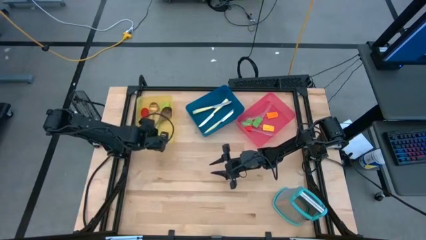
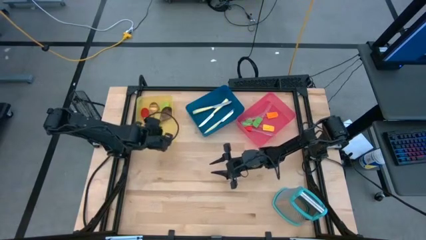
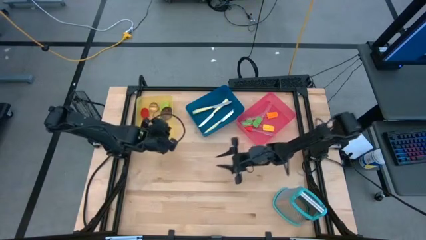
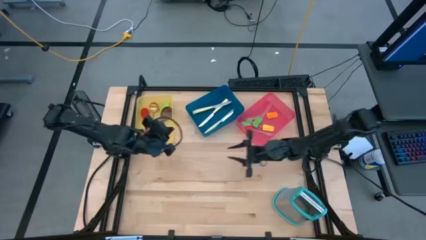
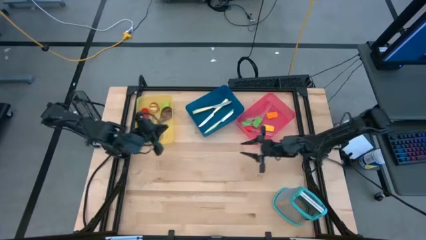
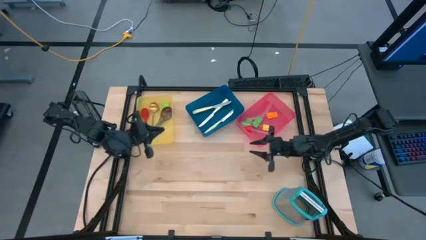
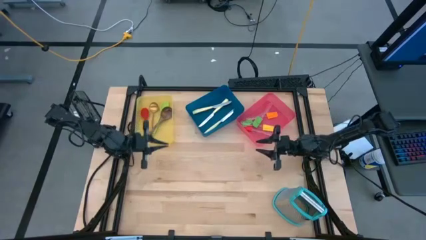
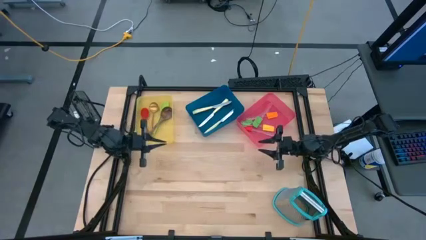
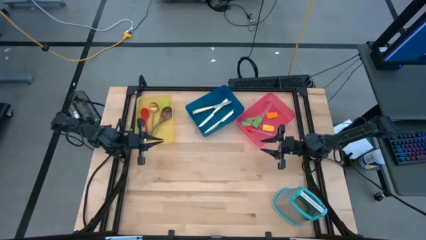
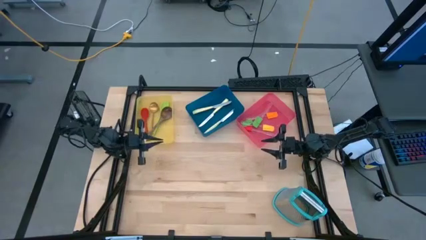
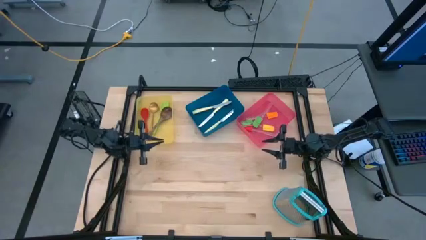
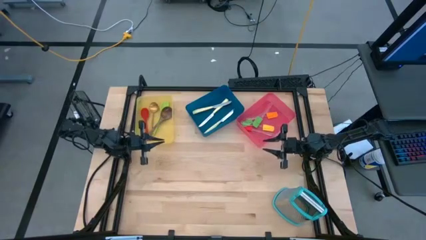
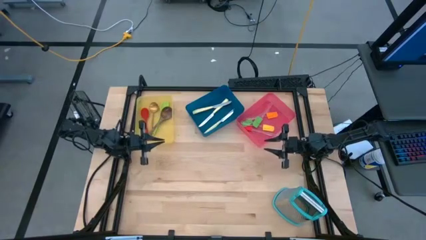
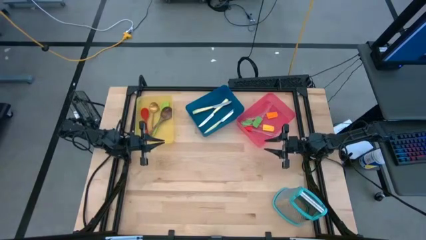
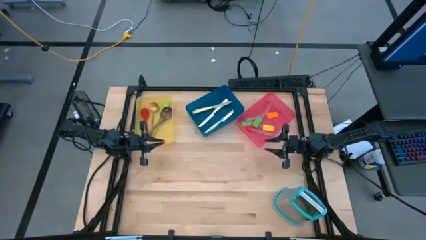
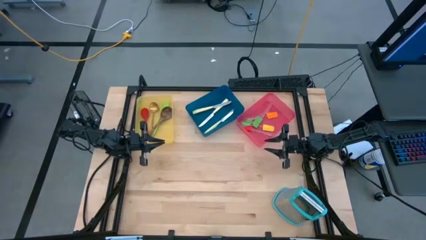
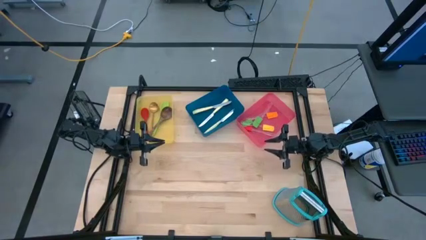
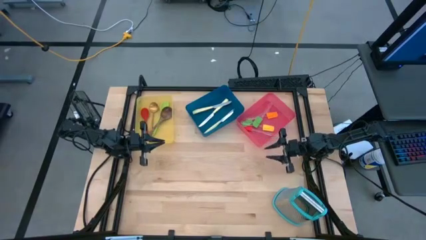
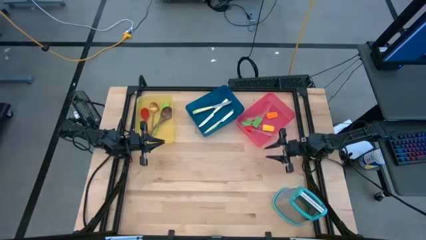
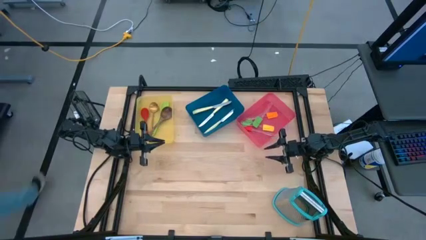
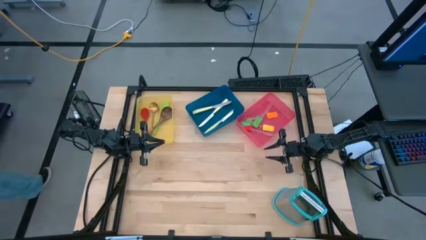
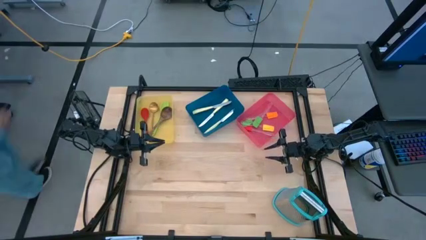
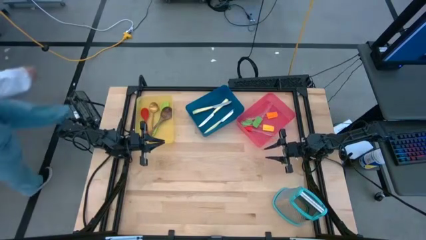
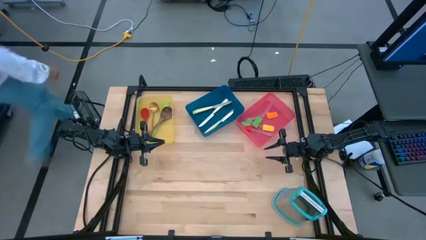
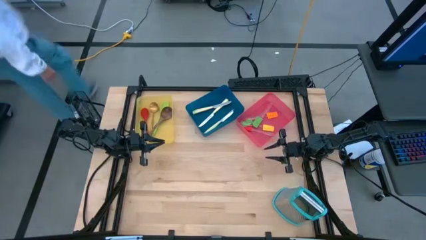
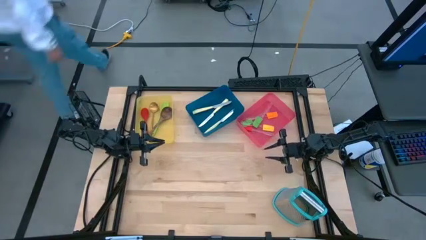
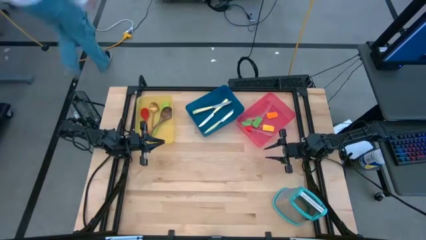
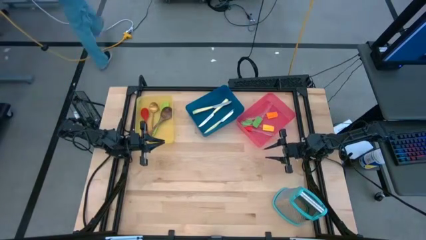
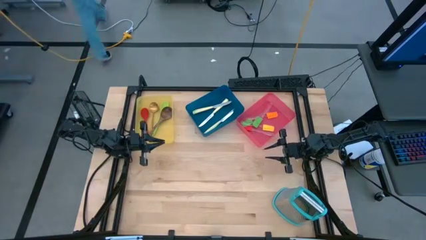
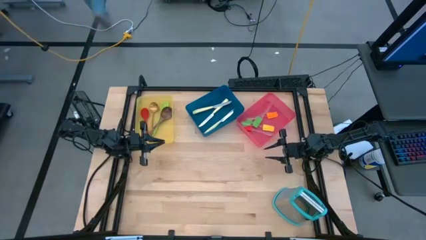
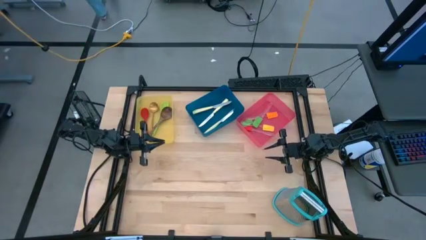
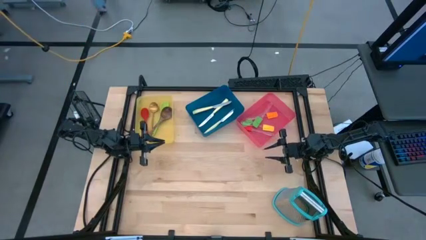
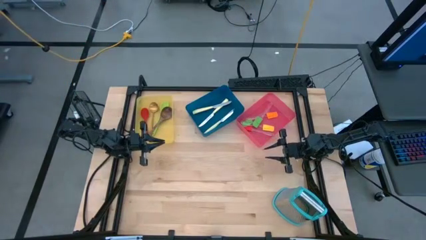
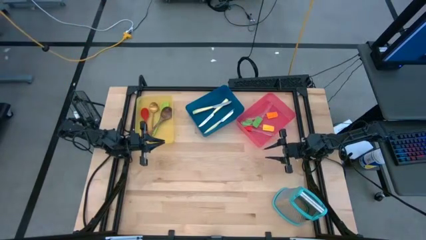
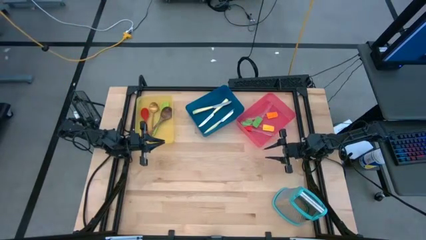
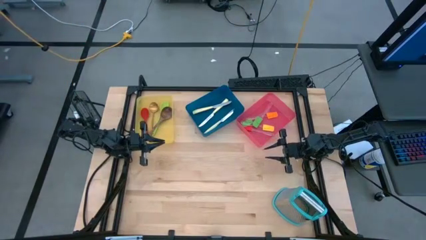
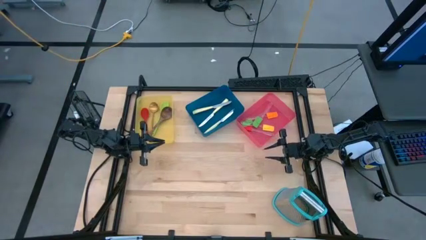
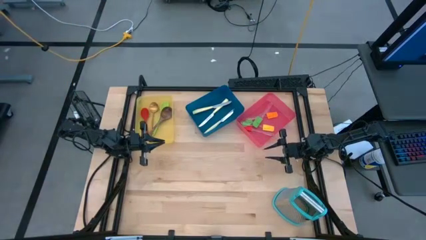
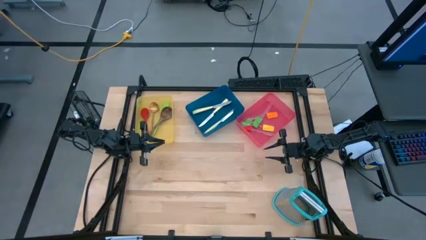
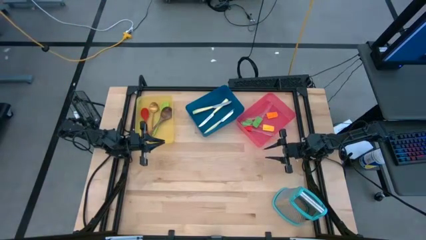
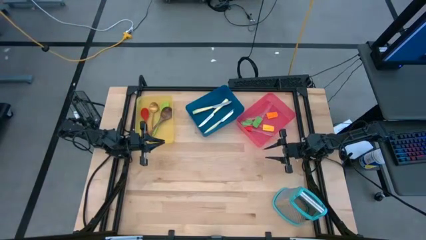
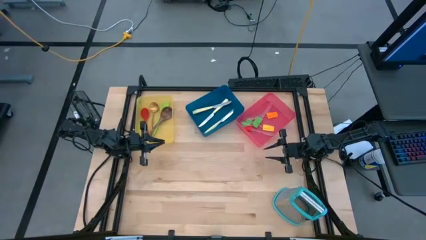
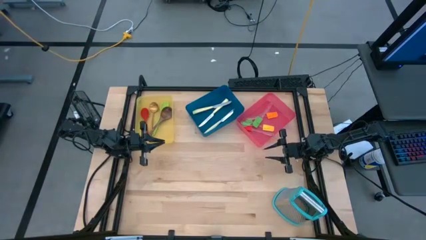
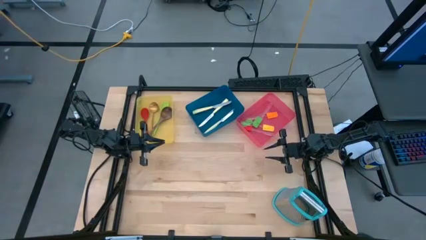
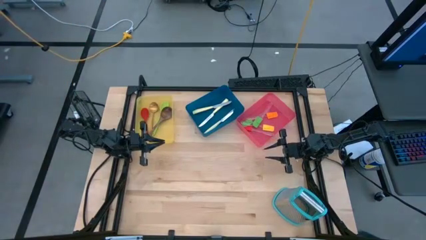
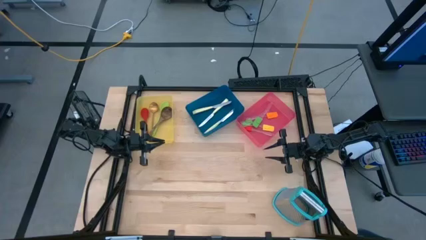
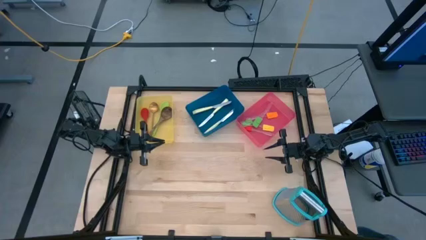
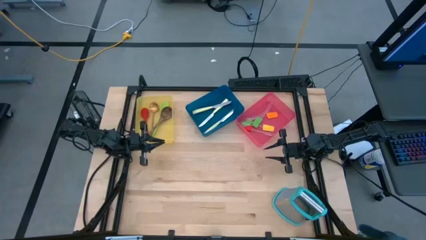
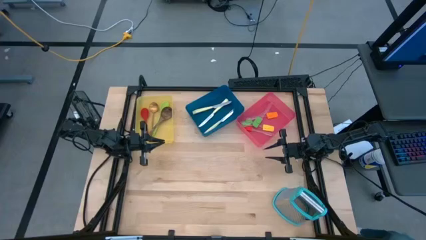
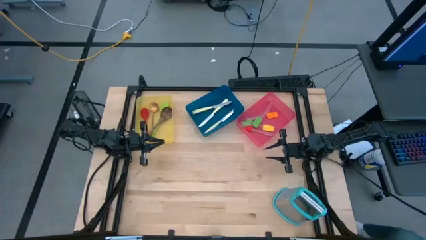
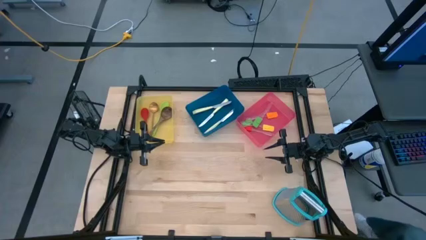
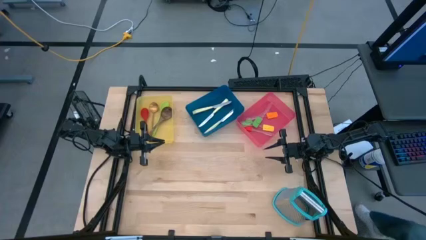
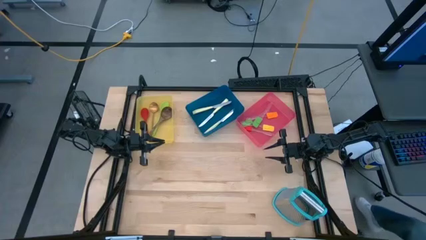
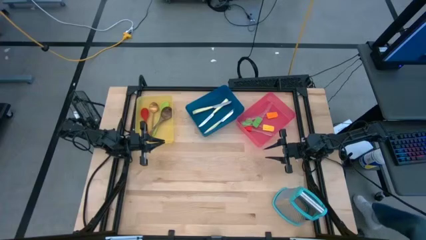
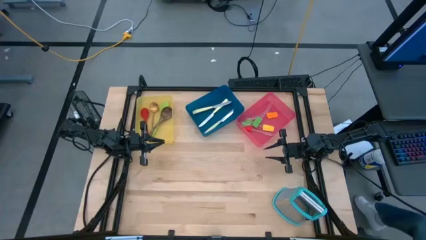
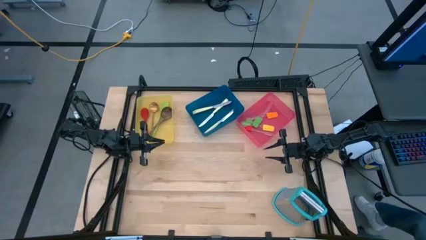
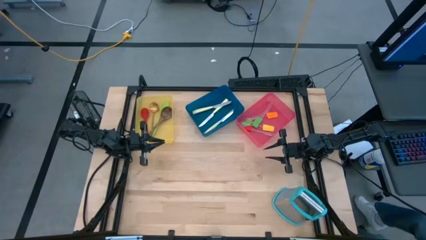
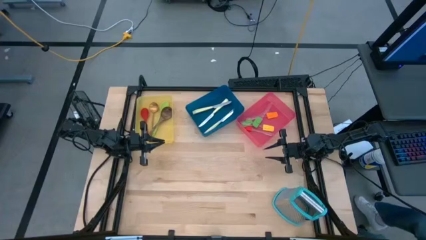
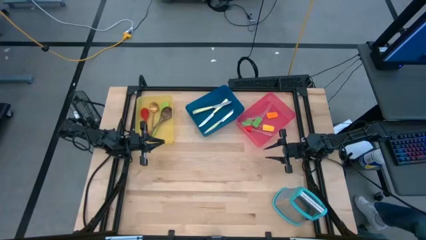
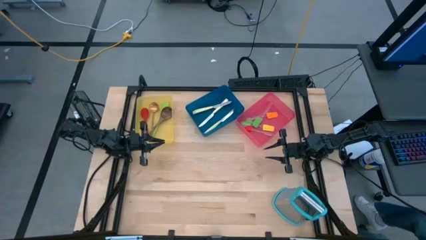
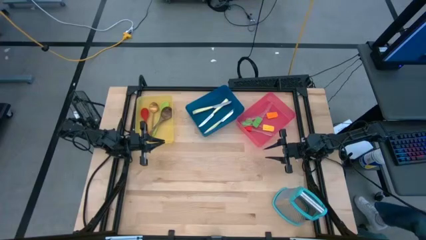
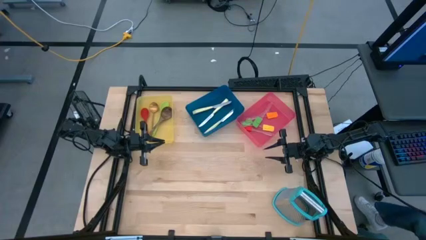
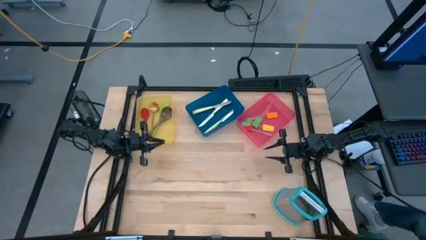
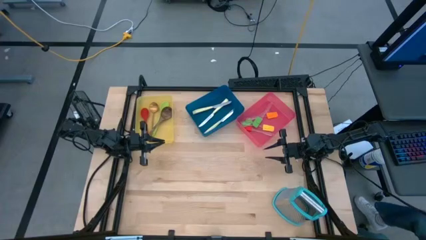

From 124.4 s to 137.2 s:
Task: Pick & Place Kitchen Items
Return to Home Position

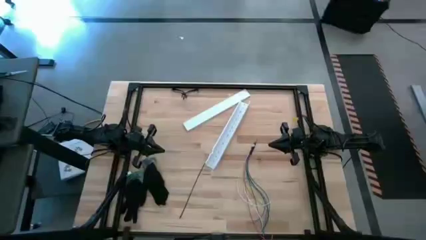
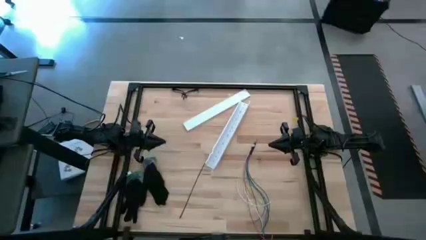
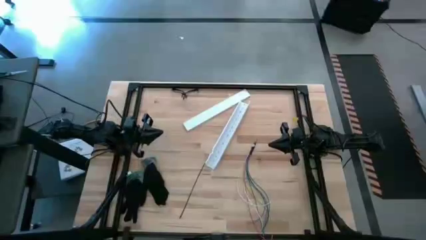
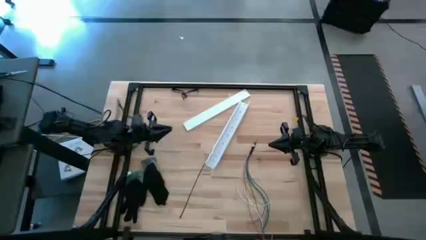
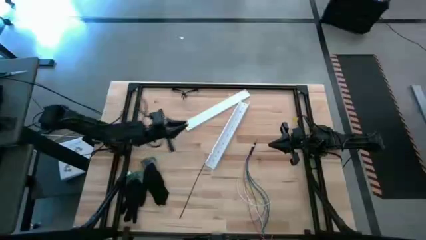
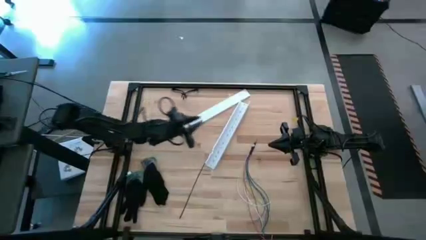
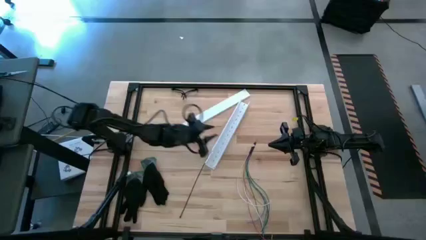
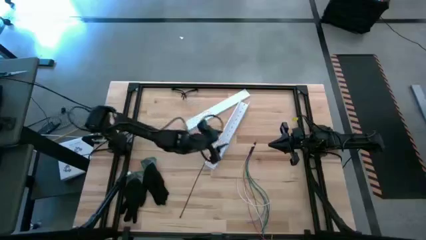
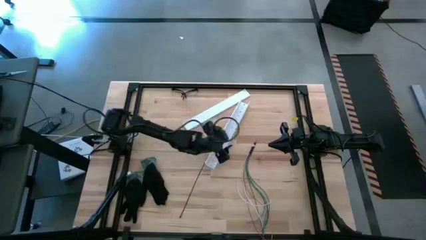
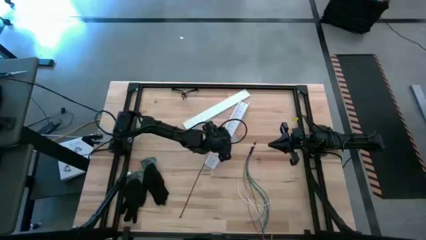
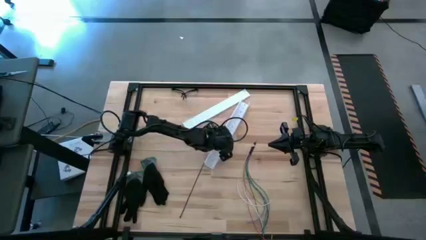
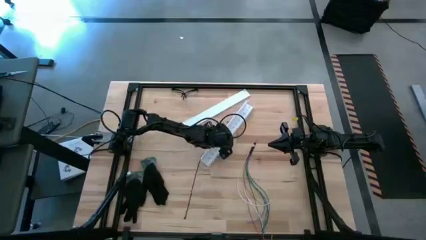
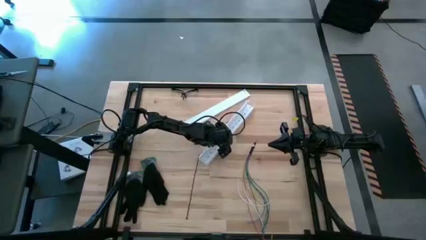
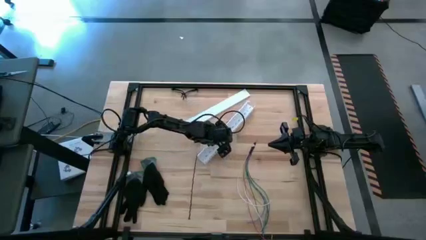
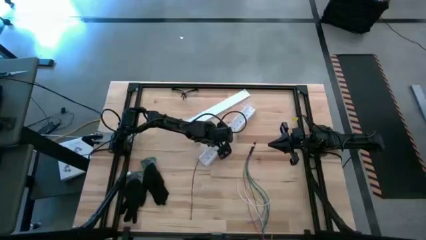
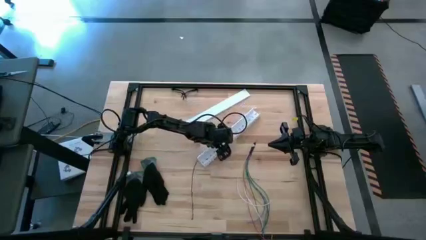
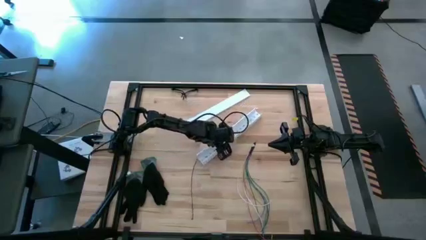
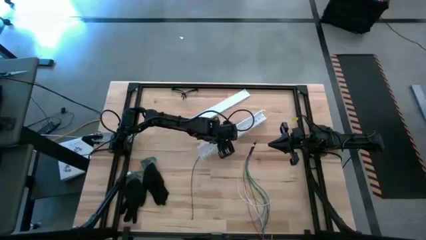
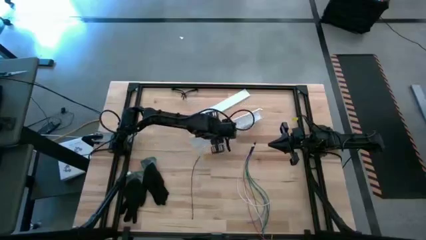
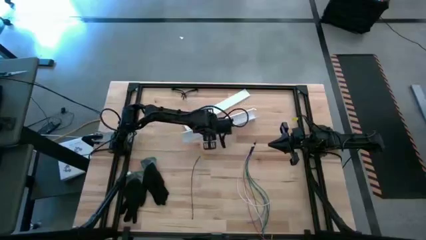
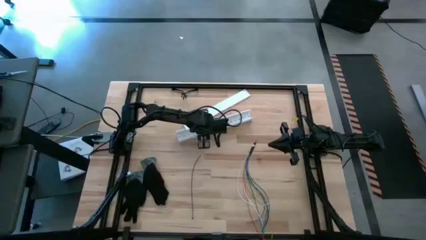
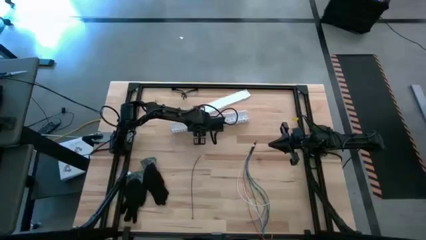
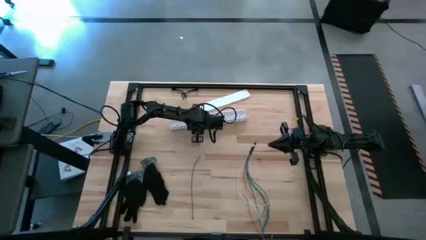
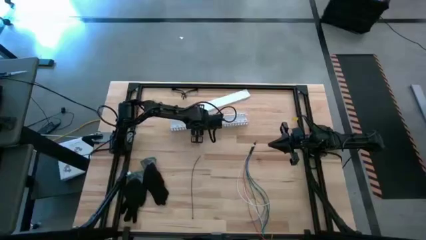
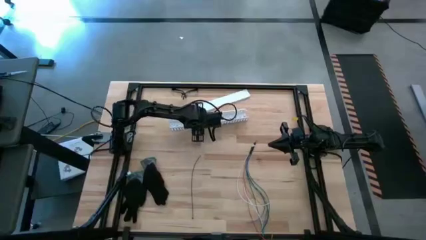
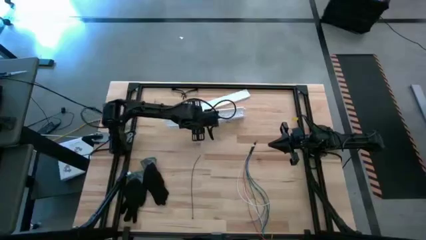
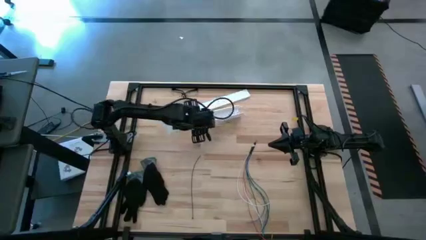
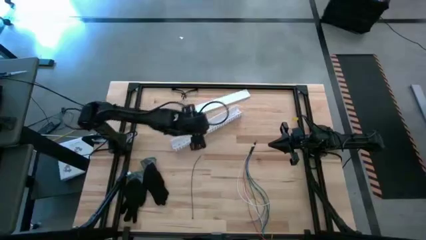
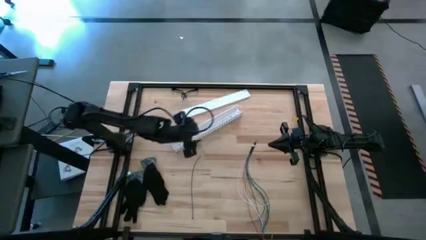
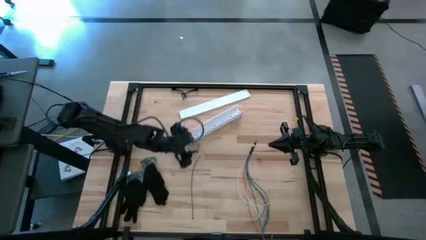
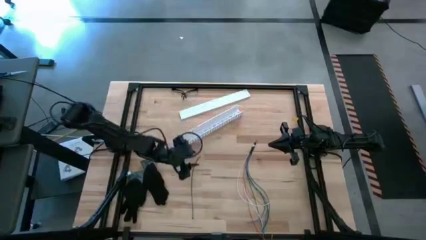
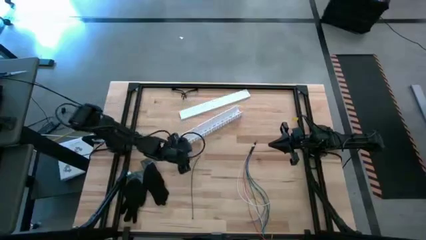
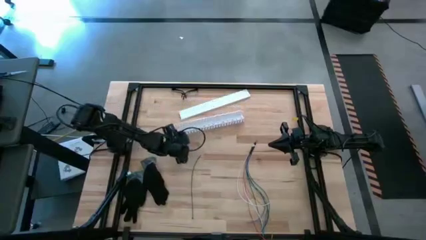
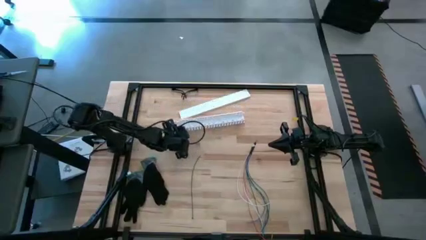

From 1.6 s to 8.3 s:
Task: Ziptie cables
Adjust the white cable duct
